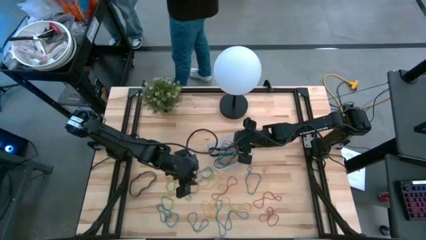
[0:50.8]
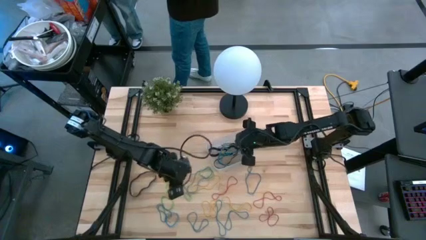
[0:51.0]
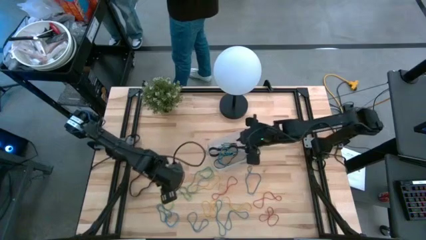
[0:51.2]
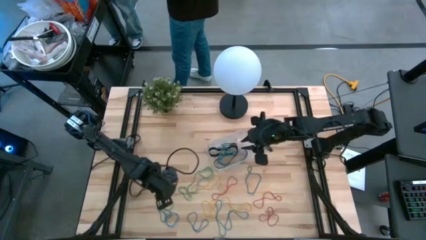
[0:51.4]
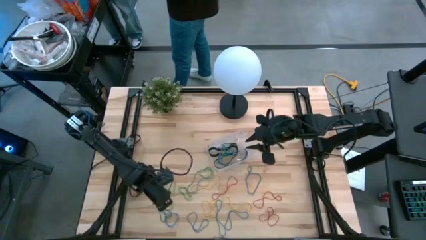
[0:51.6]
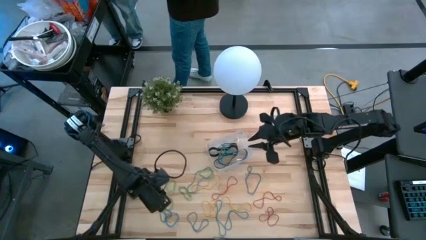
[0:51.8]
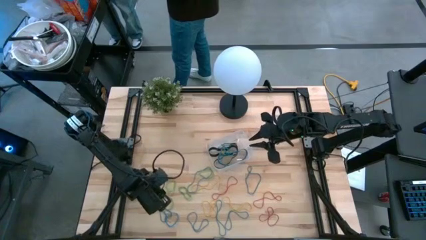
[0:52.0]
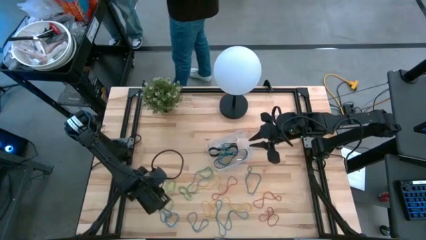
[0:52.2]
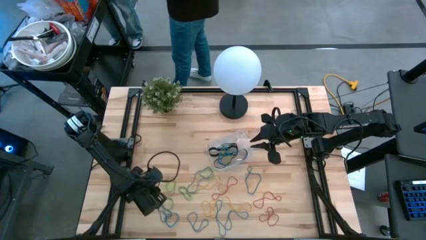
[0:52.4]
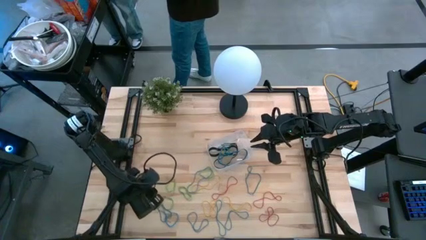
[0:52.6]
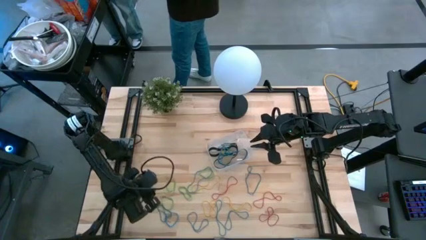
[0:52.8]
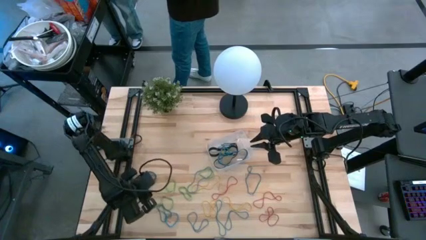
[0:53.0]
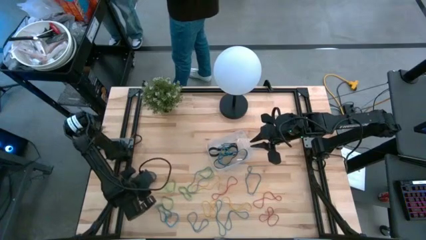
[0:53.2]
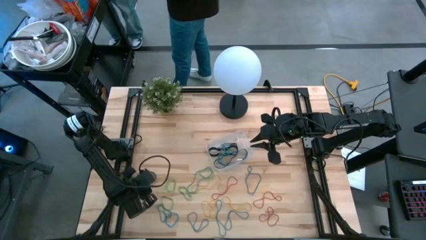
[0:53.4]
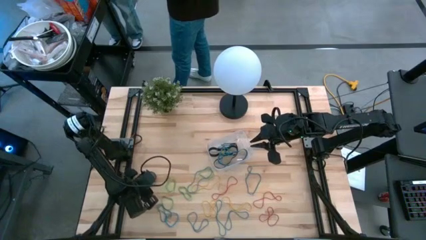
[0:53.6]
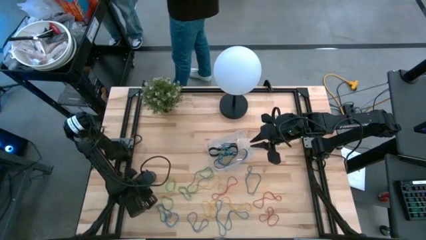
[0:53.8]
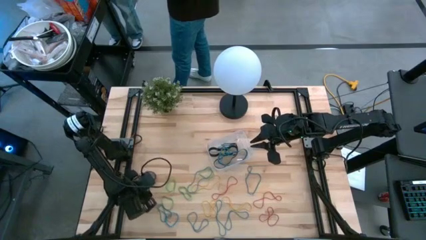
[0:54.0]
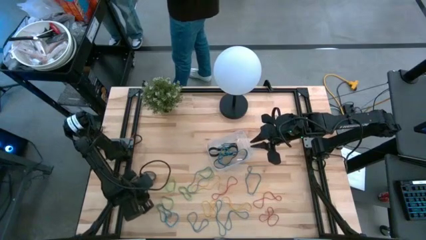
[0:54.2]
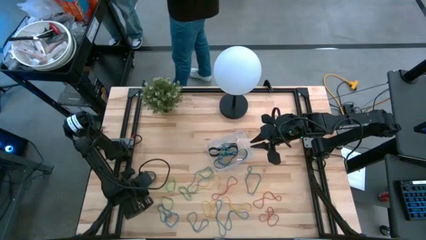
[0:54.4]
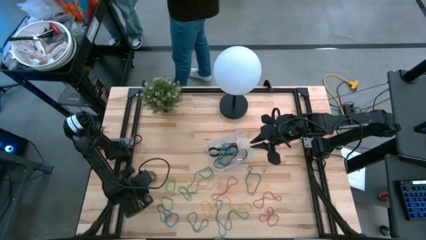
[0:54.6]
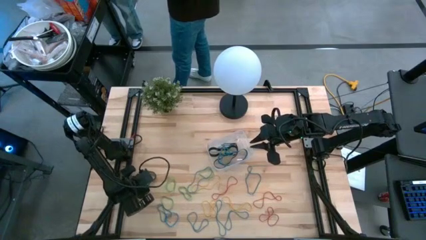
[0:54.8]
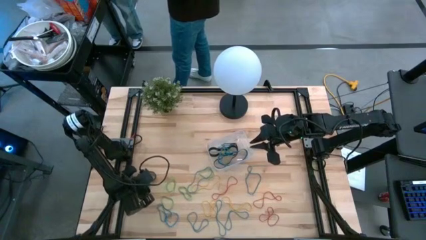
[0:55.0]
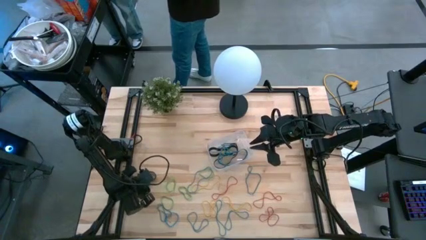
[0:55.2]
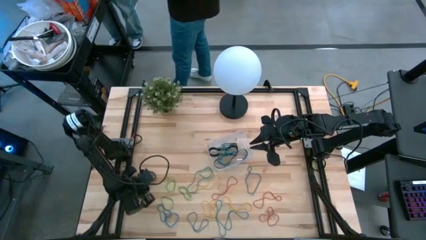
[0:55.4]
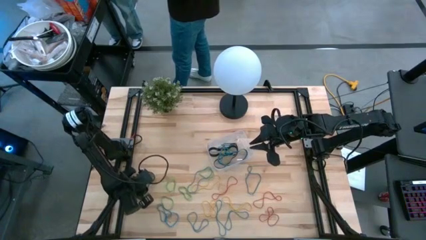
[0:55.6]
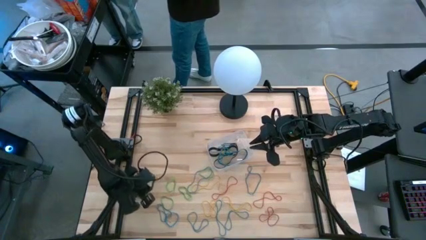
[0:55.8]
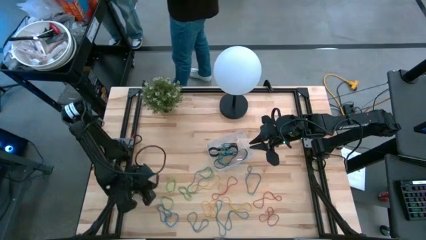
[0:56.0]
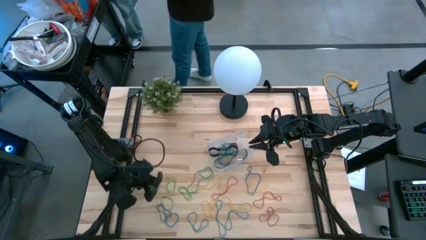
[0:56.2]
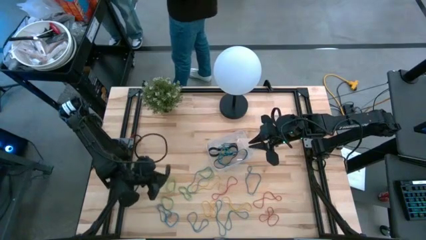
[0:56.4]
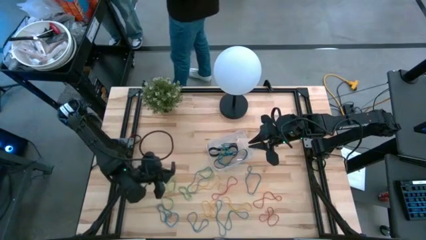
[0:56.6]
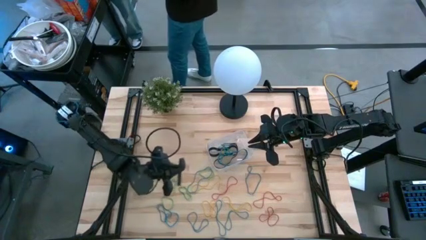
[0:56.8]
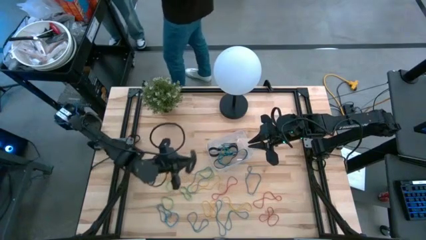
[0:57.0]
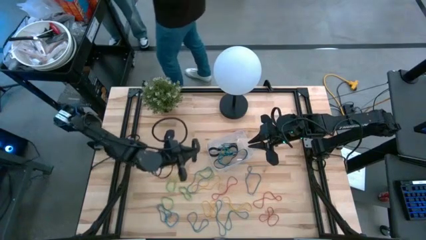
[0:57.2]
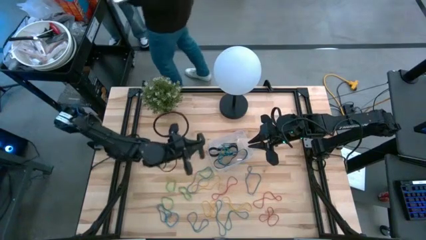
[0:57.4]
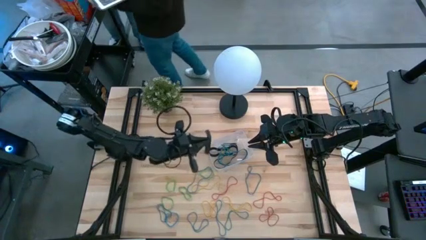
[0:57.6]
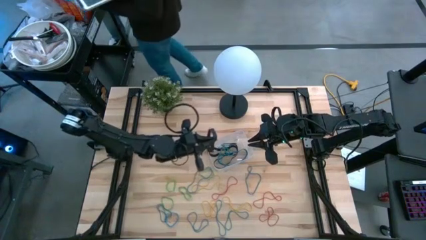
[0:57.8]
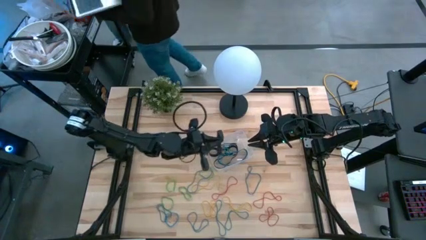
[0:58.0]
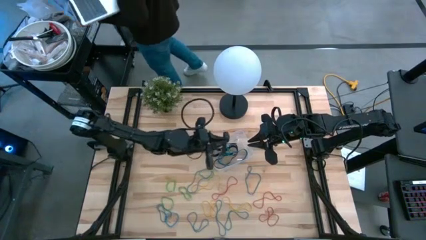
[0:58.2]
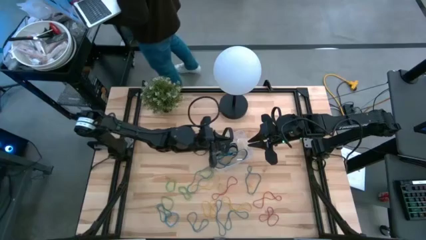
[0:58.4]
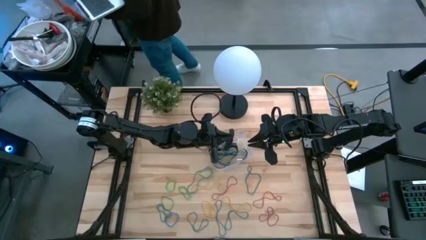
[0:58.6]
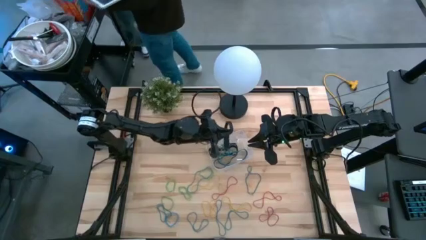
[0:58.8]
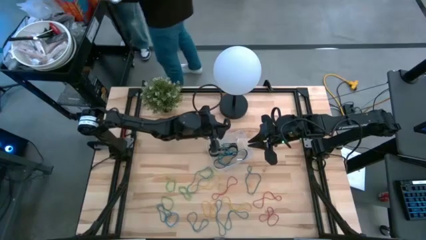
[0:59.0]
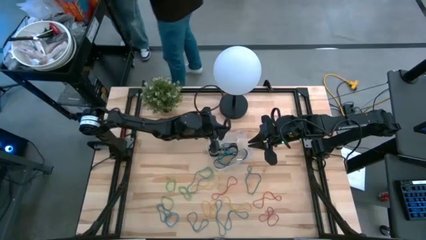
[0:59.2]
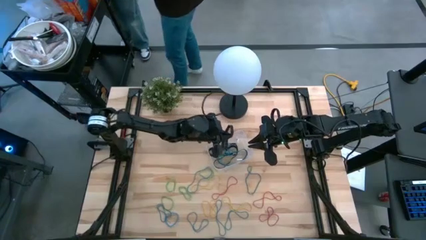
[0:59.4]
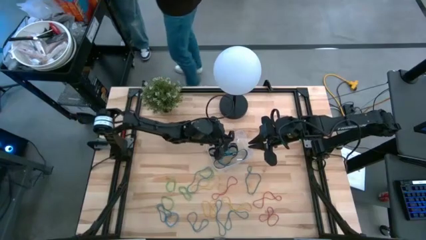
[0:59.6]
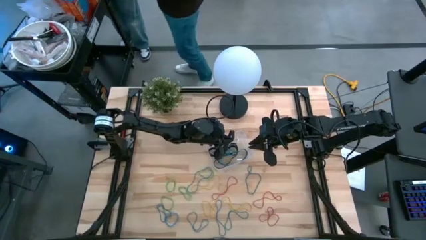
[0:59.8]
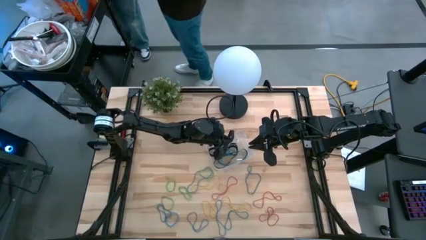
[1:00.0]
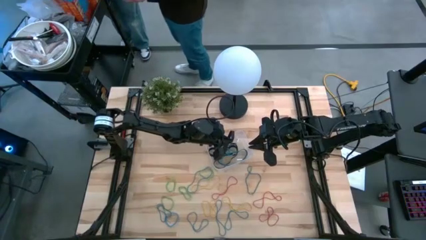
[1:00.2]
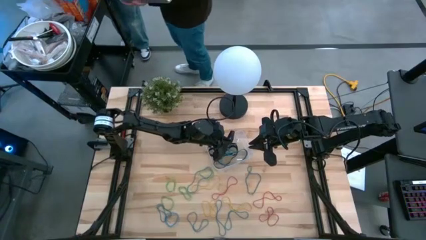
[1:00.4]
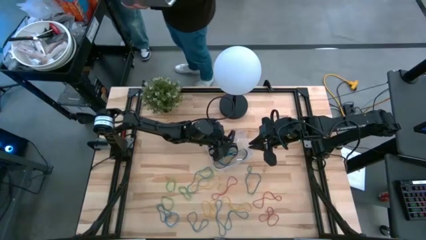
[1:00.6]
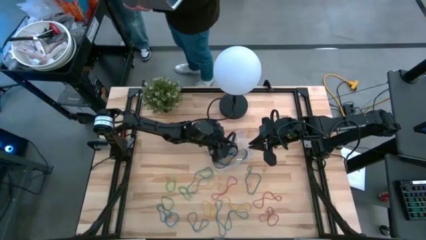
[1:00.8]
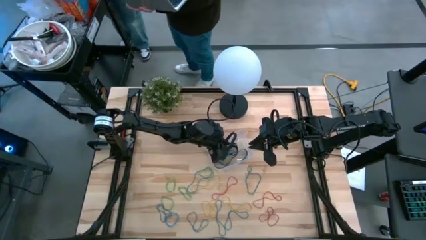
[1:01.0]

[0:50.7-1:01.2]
Task: Pick and place rubber bands into bin
Put the black rubber band into the transparent bin

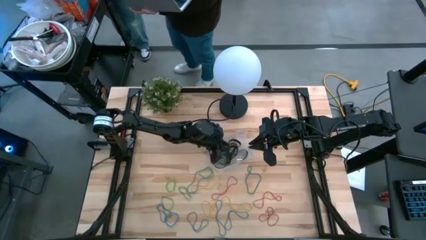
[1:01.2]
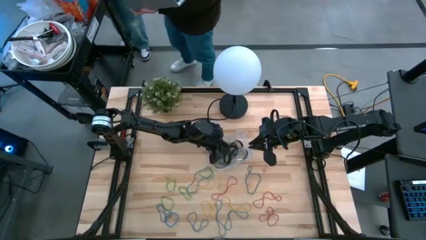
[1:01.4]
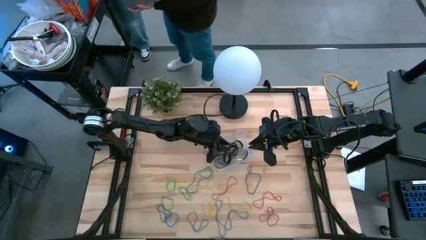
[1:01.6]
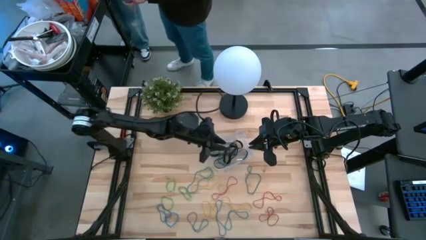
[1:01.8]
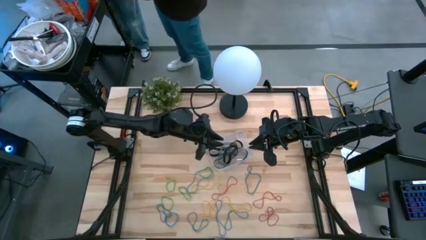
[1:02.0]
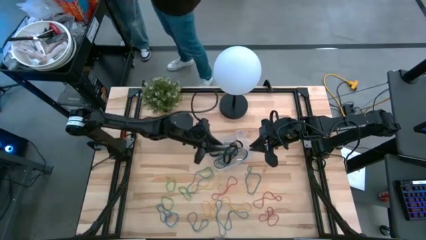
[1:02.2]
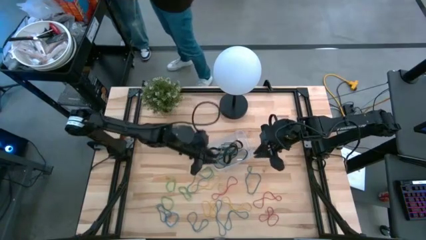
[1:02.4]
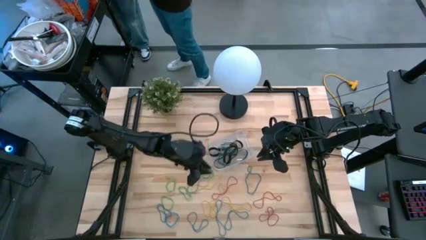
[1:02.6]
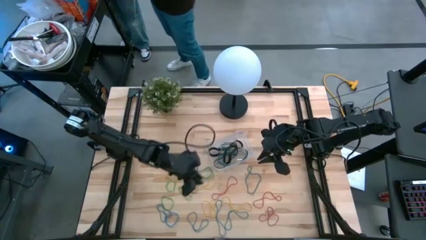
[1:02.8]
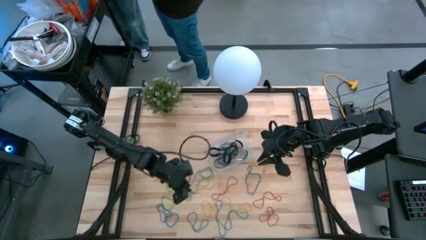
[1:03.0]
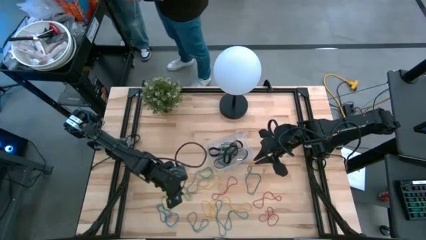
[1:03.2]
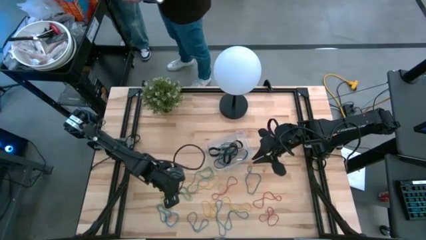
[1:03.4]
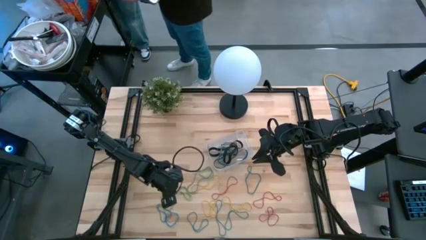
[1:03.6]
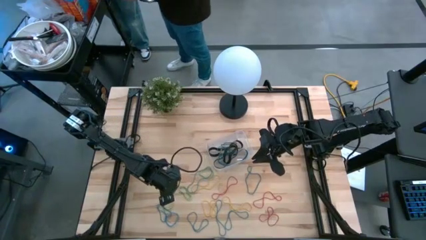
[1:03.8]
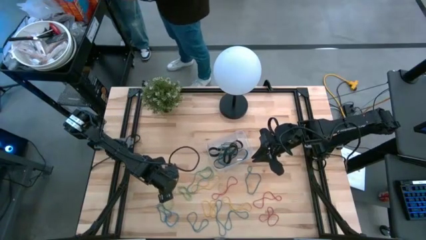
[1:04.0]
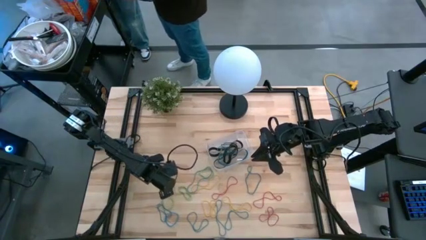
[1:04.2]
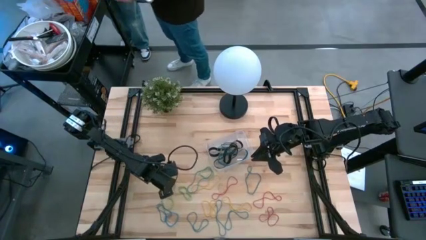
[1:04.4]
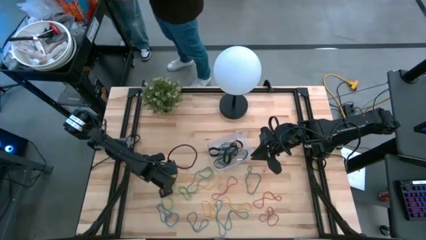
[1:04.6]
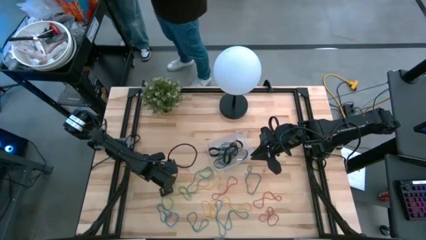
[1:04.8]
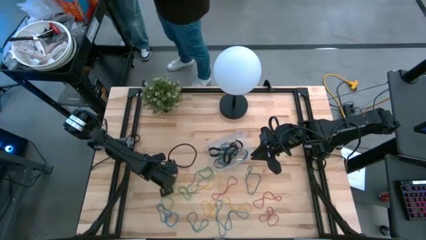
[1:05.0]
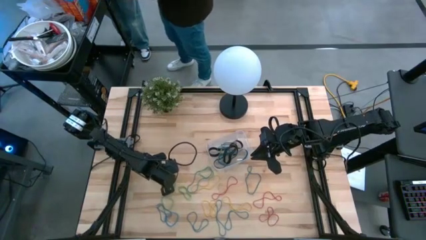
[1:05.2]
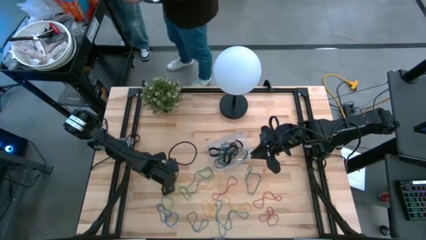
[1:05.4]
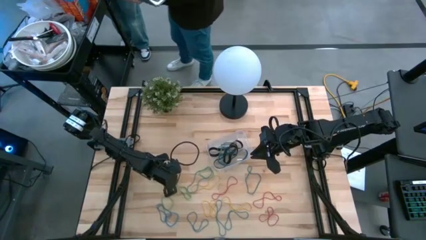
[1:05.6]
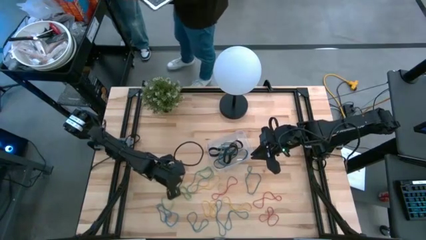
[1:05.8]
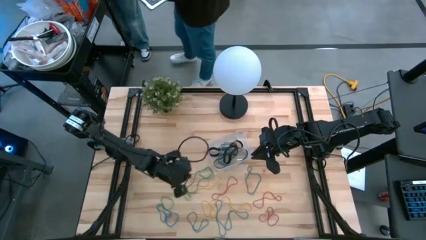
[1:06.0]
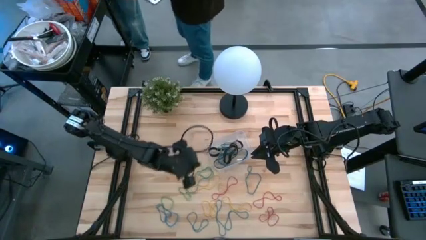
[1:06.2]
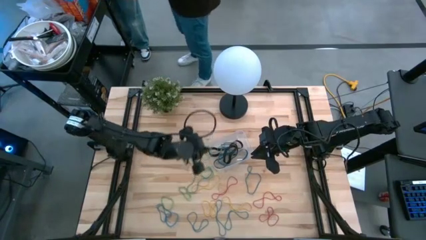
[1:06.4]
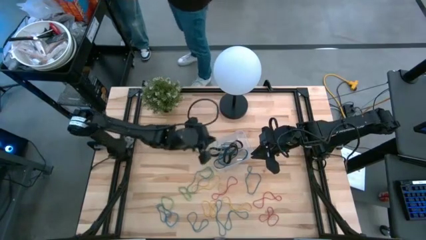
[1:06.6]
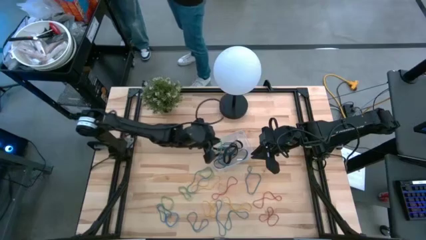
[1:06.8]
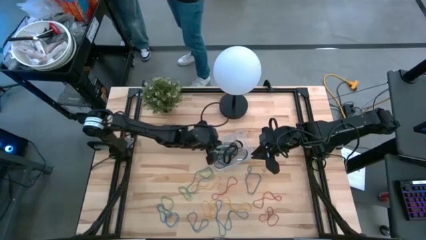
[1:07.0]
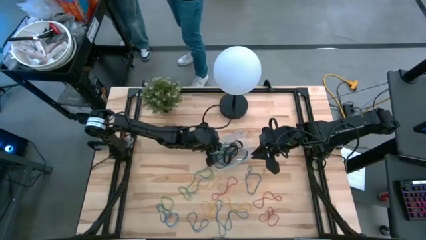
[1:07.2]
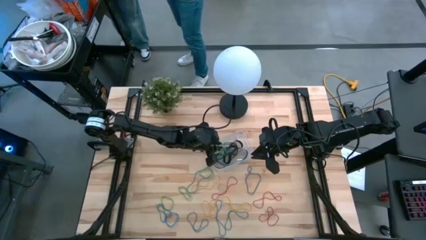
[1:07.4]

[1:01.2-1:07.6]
Put the green rubber band into the transparent bin
